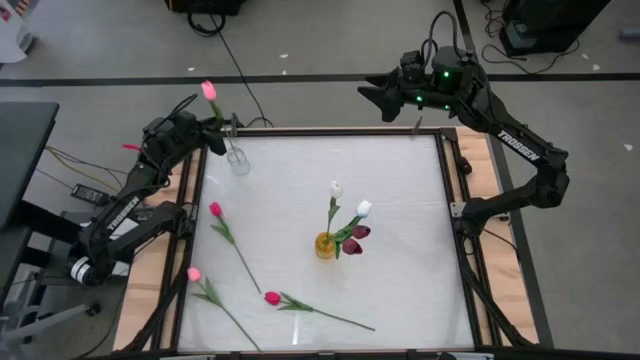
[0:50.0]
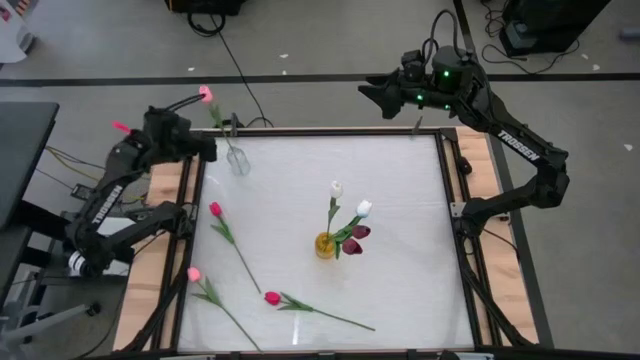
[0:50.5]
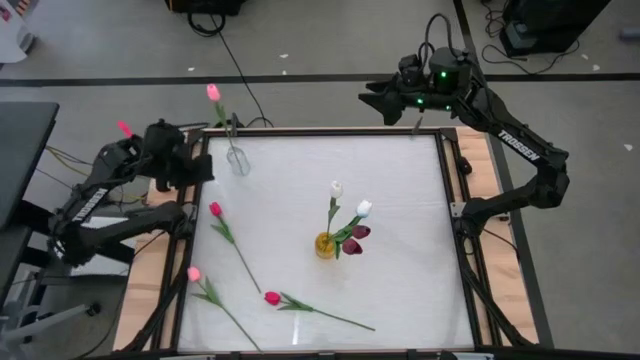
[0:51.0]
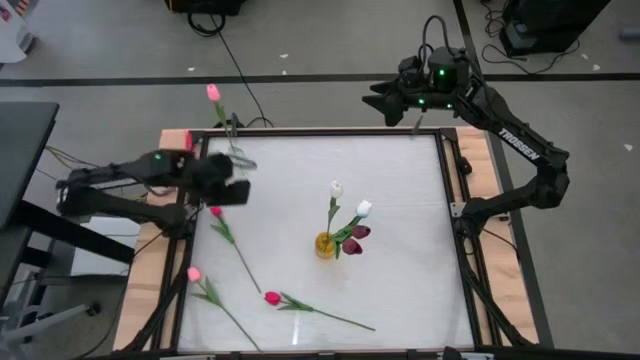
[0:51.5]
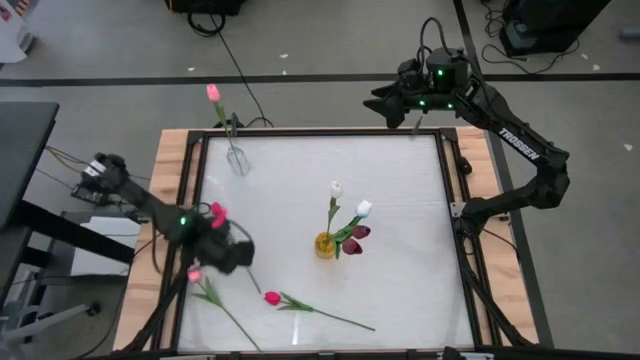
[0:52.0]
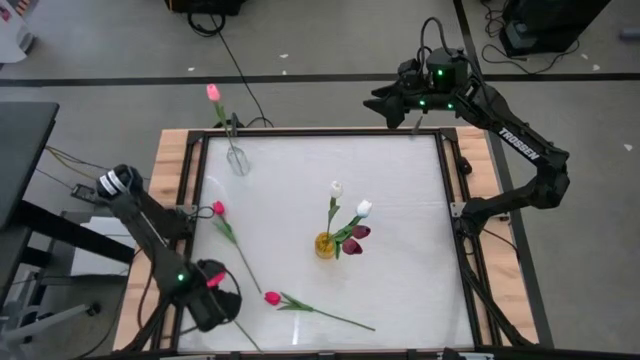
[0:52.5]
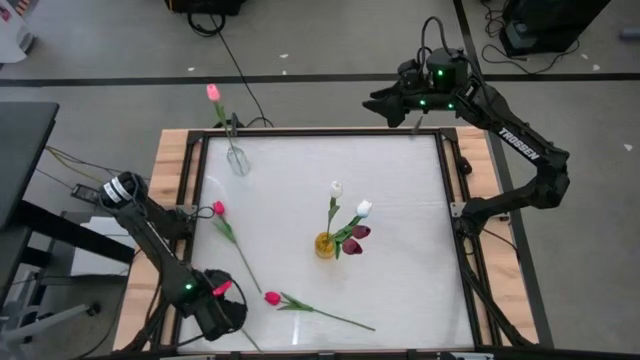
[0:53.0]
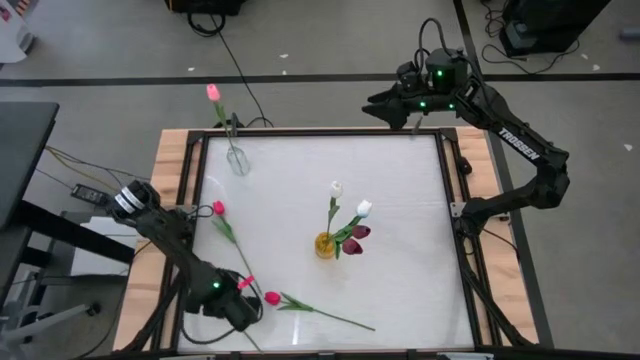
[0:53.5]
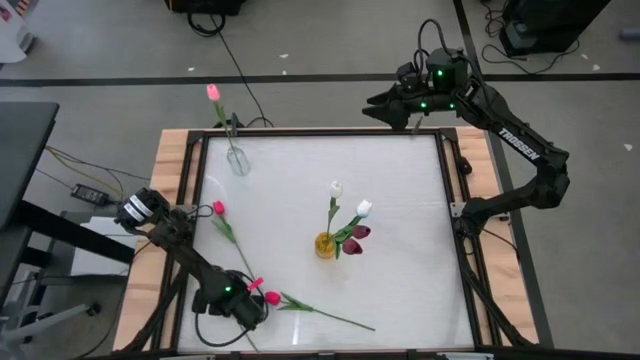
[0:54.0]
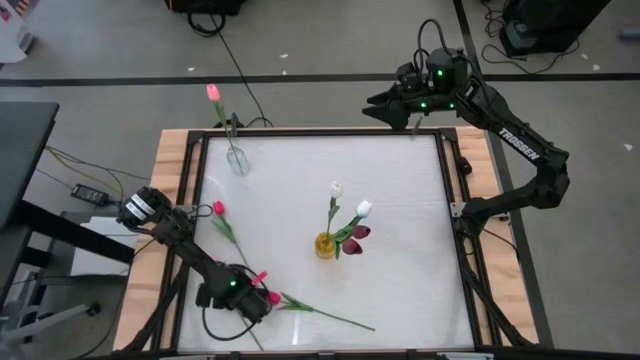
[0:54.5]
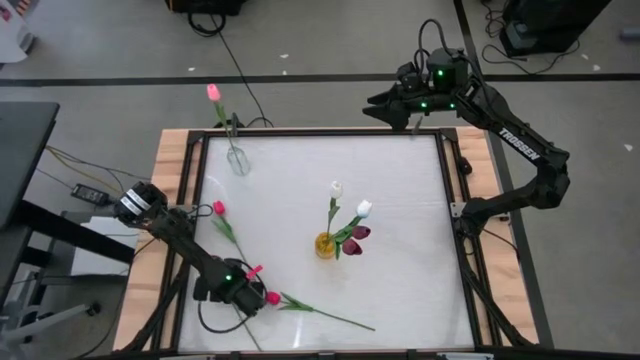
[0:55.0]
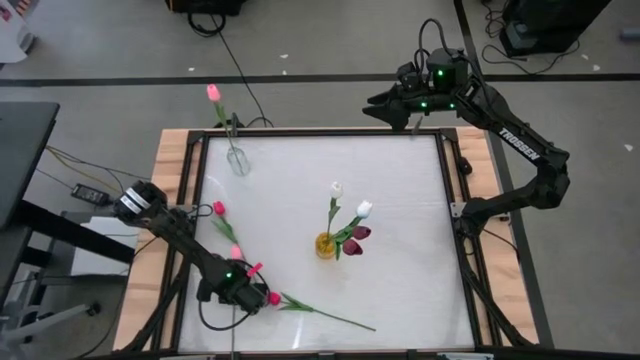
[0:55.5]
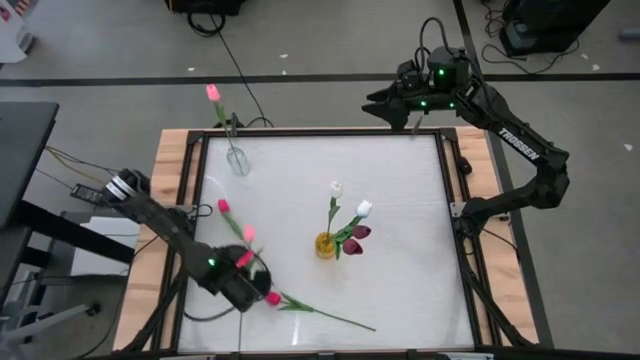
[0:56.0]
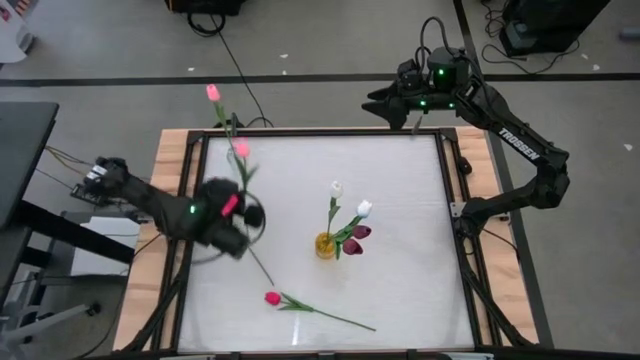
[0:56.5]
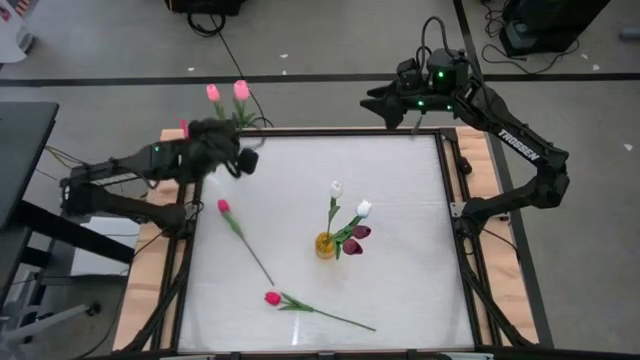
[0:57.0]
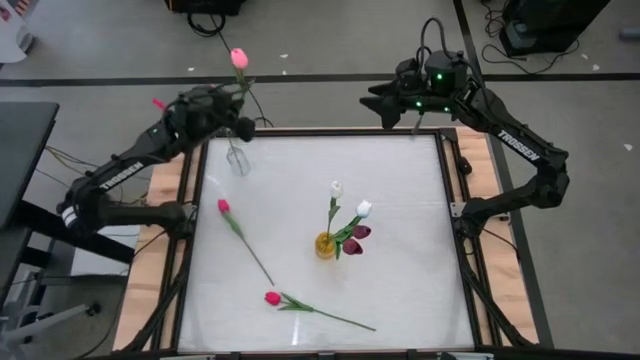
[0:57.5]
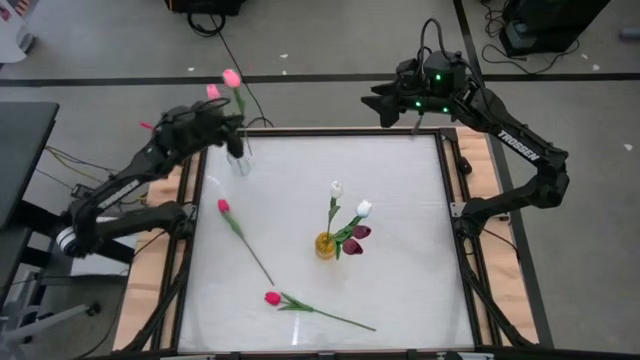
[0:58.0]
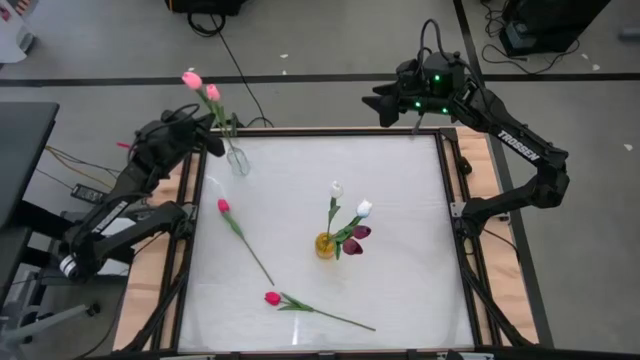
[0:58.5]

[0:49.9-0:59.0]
Task: Sort flowers into vase by color
Put the pink tulip into the transparent flower vase

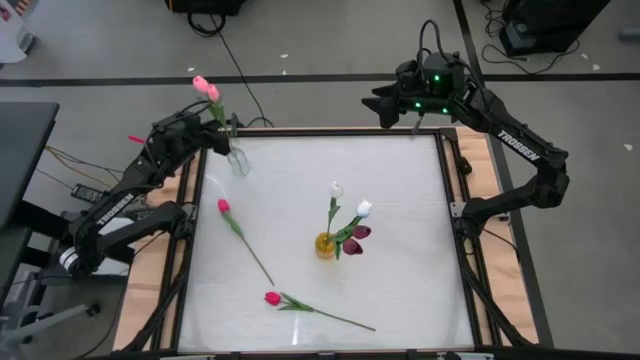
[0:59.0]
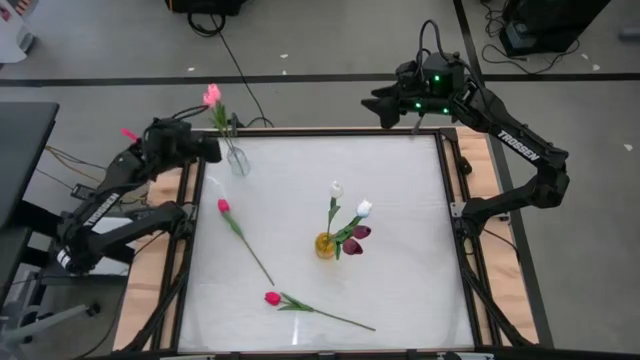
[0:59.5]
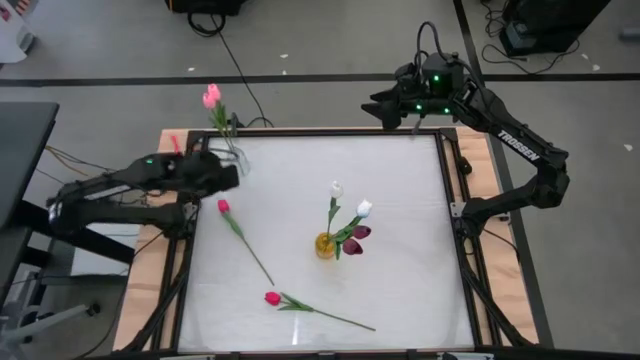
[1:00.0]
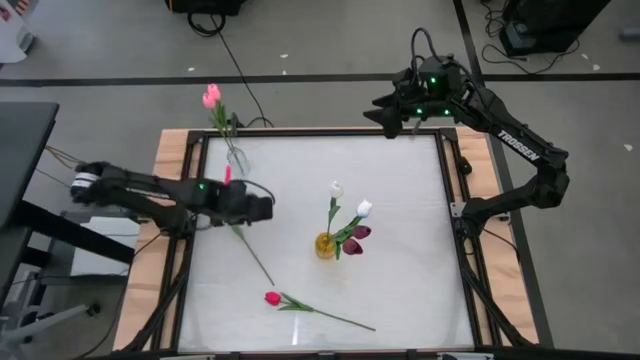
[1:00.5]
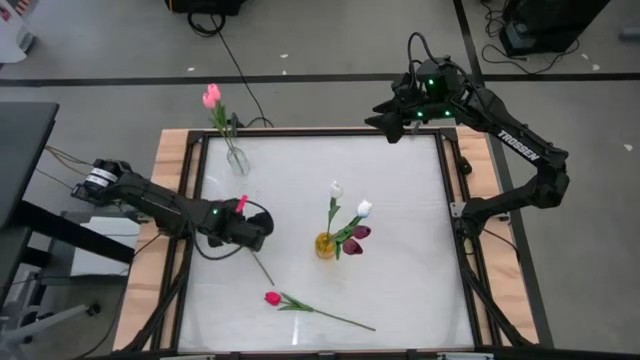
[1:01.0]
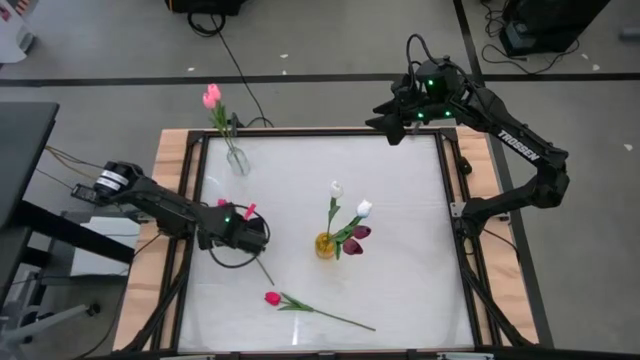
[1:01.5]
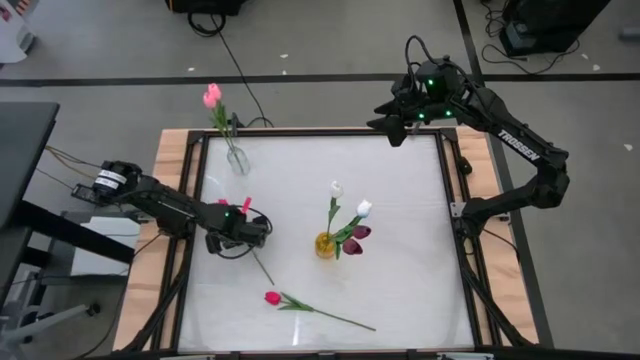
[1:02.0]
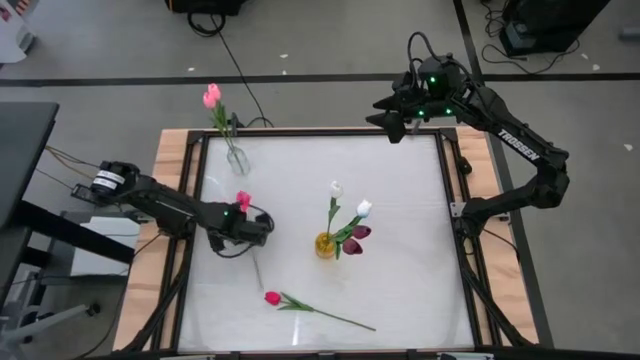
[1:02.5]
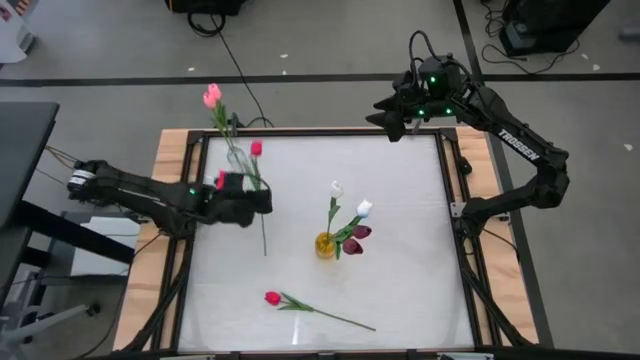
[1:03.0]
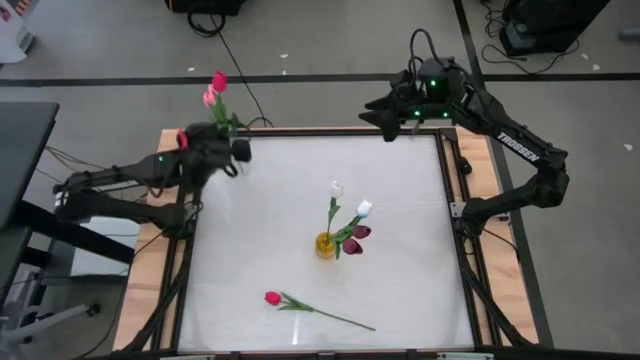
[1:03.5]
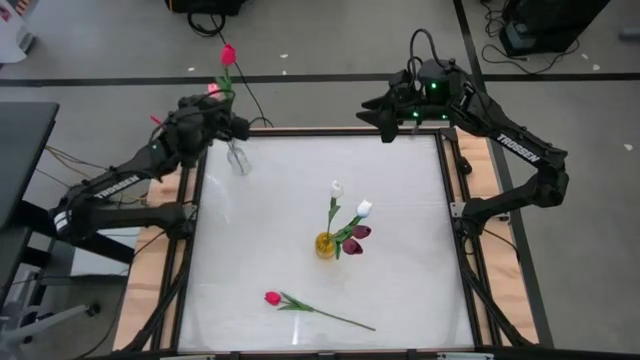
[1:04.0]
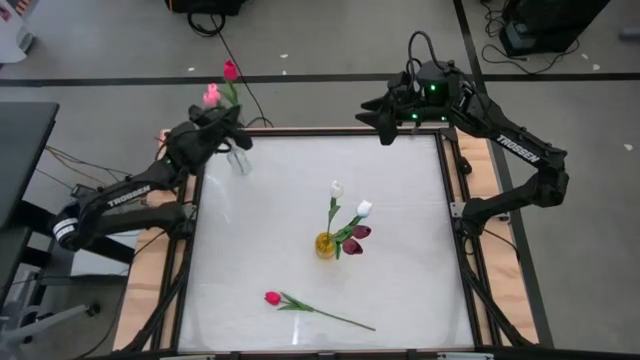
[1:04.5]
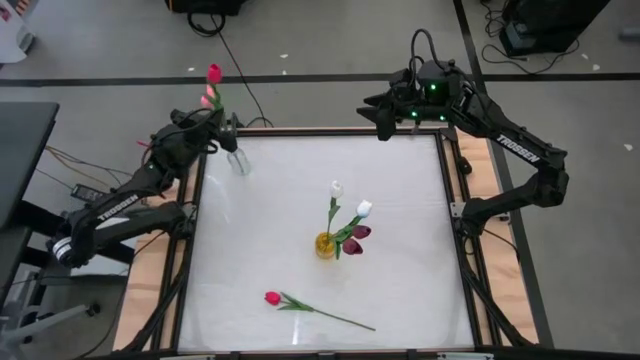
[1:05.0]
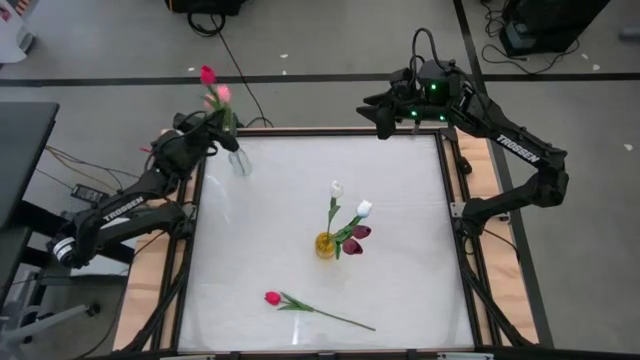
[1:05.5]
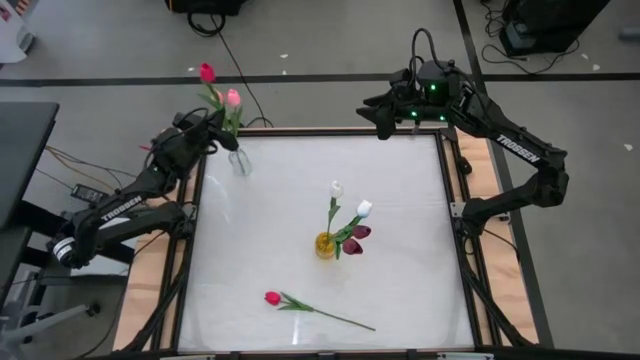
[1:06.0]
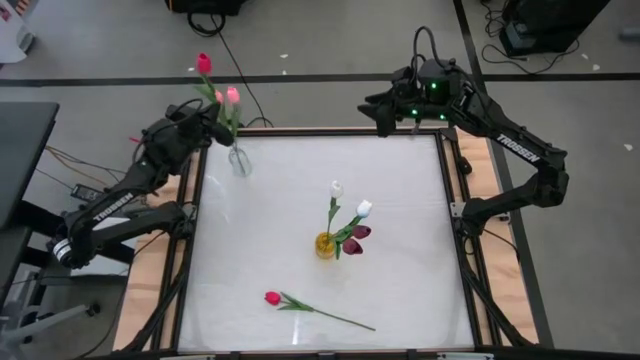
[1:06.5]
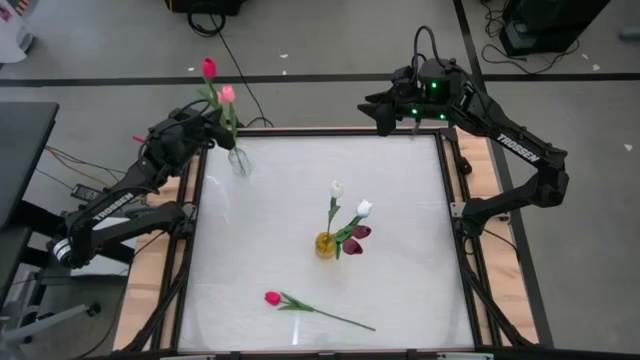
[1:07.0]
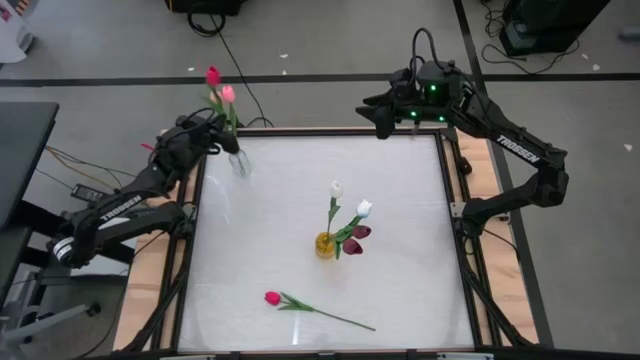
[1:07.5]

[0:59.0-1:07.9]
Put the top red tulip into the transparent flower vase

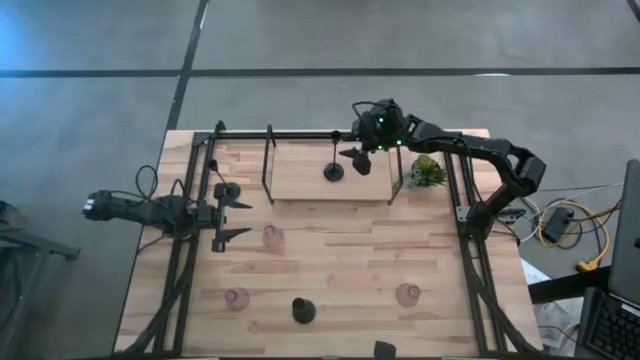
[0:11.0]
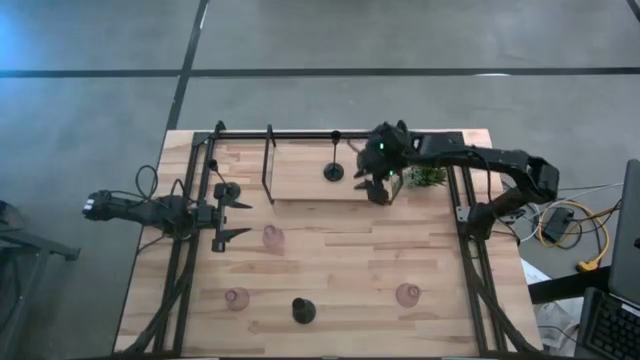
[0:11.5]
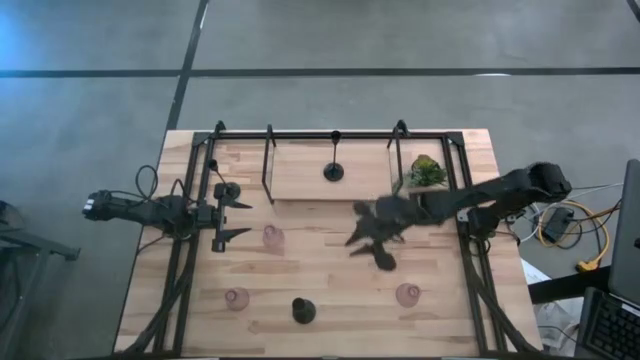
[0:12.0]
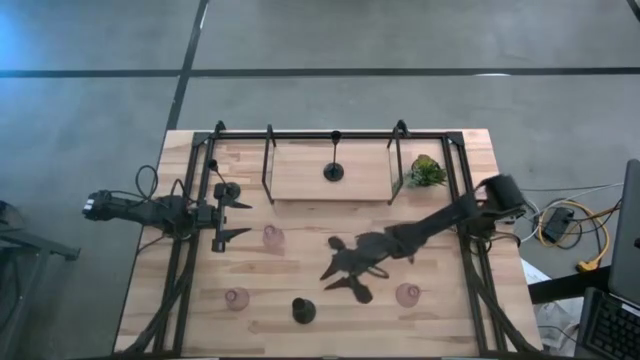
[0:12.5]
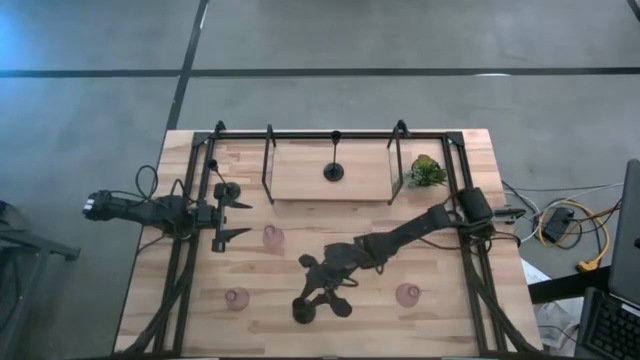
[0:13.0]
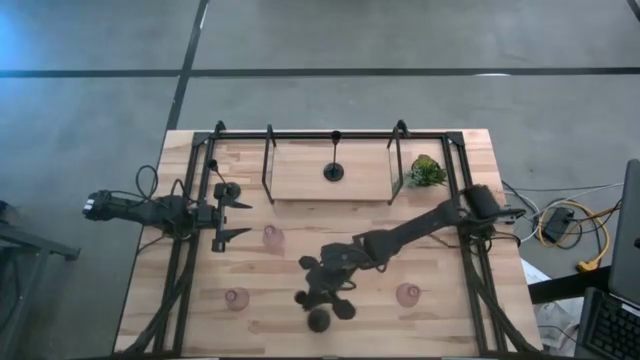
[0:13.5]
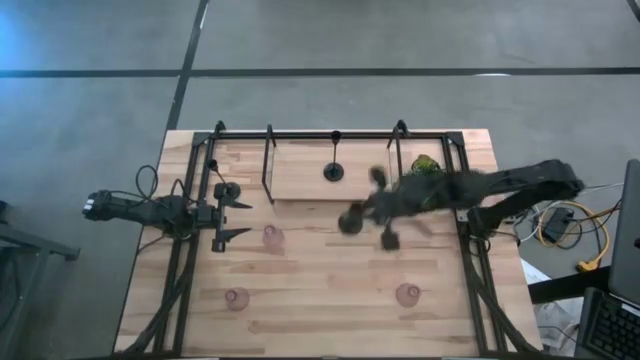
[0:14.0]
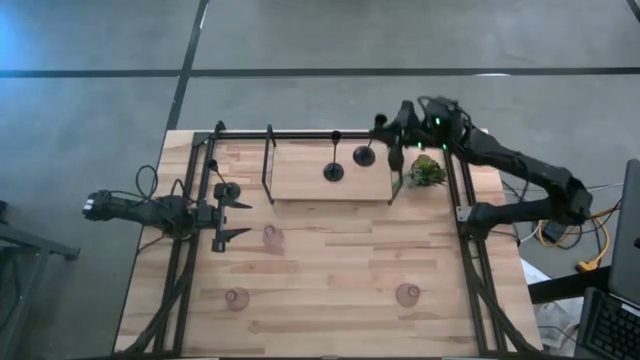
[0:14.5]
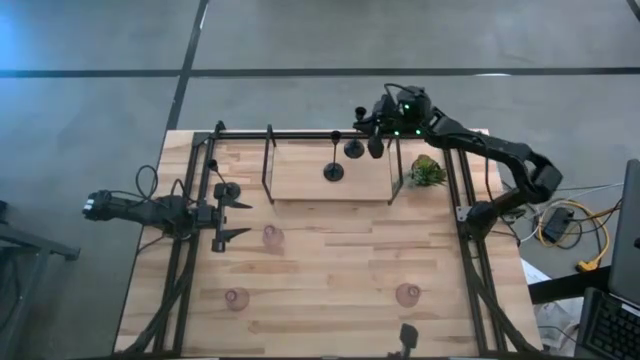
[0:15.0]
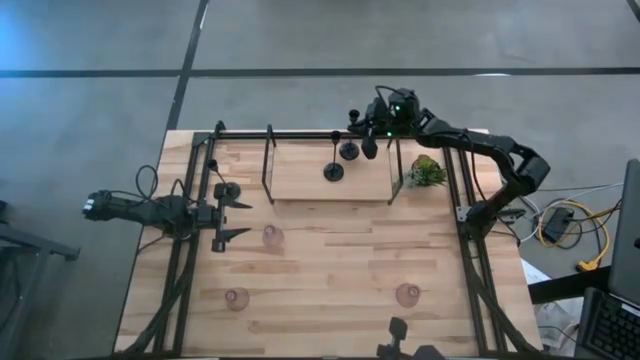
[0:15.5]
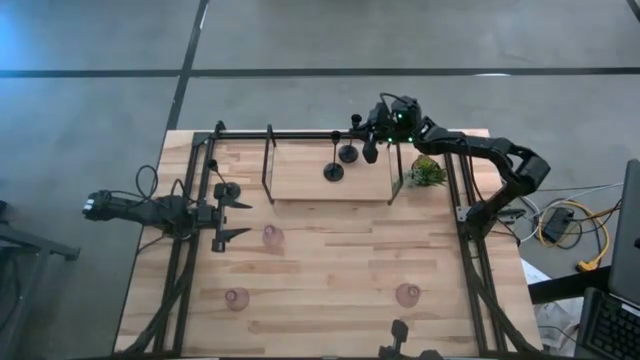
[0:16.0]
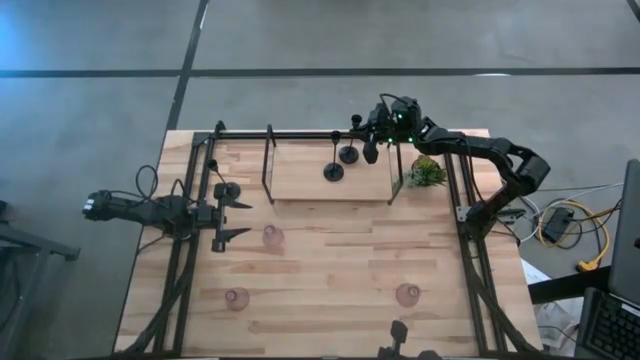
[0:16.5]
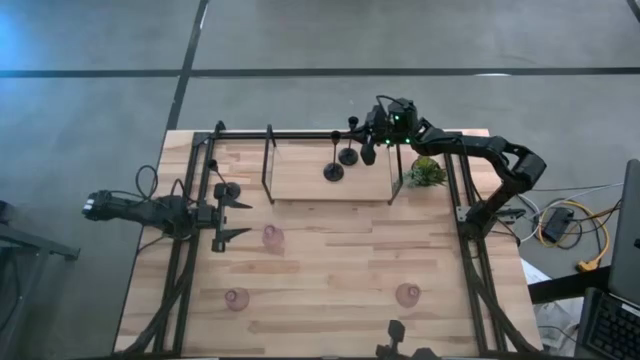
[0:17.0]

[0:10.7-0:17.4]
Task: Pick & Place candle stick holders
Put the bottom black candle holder on the shelf
